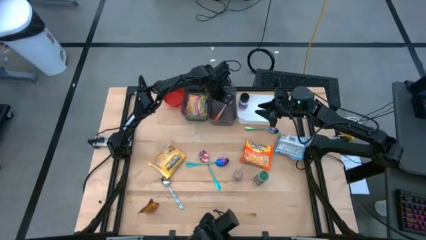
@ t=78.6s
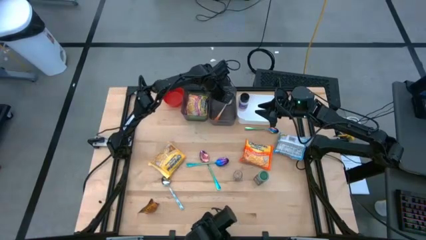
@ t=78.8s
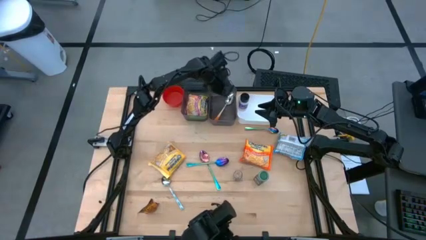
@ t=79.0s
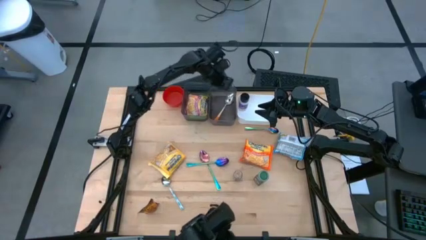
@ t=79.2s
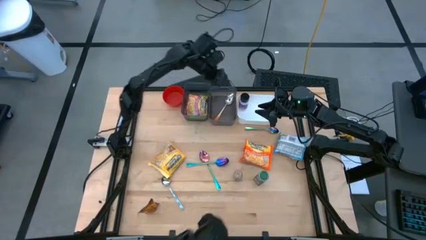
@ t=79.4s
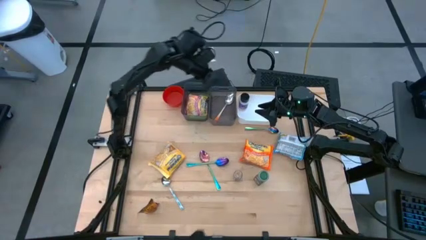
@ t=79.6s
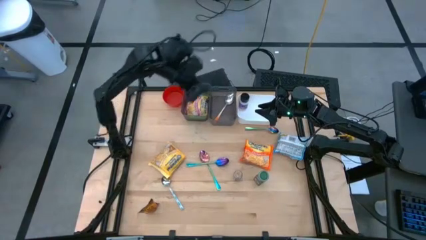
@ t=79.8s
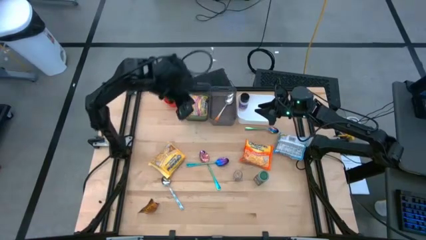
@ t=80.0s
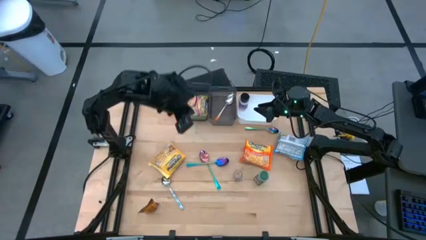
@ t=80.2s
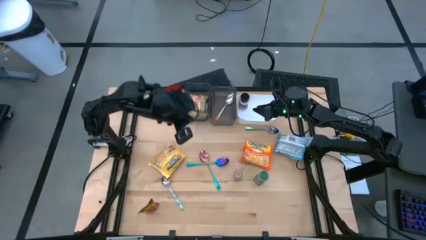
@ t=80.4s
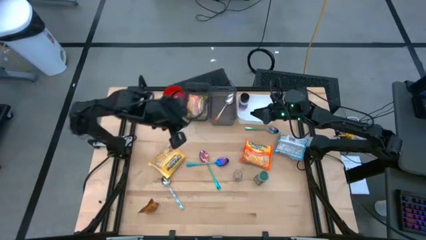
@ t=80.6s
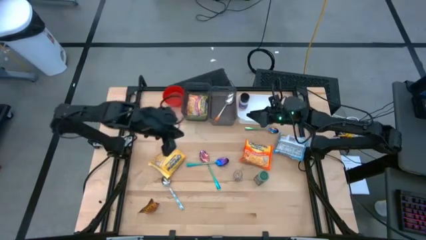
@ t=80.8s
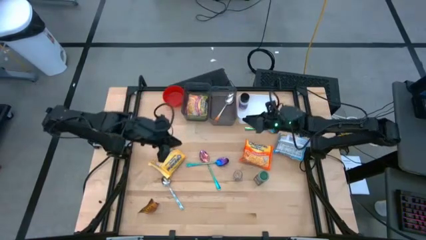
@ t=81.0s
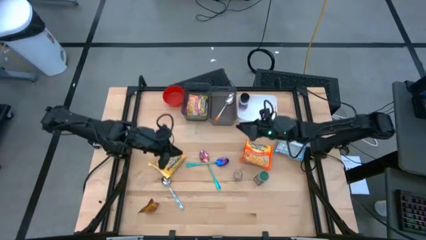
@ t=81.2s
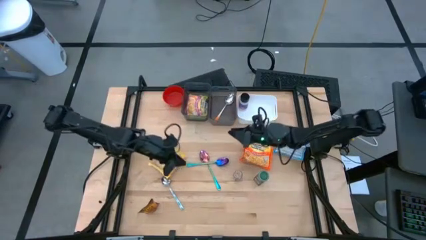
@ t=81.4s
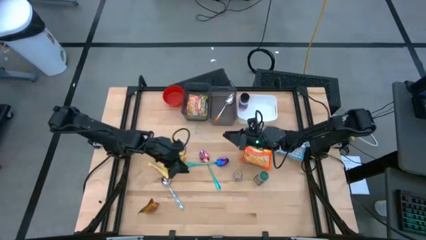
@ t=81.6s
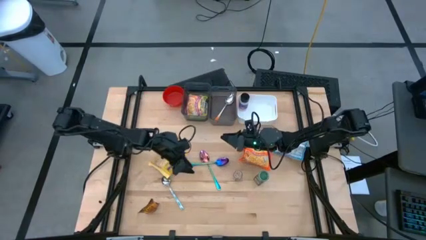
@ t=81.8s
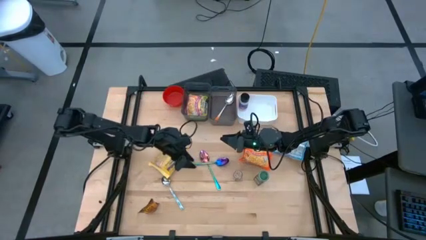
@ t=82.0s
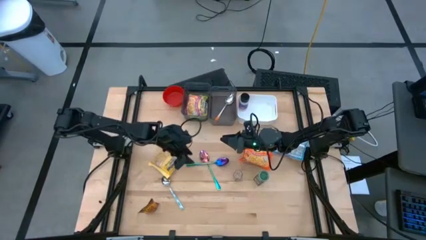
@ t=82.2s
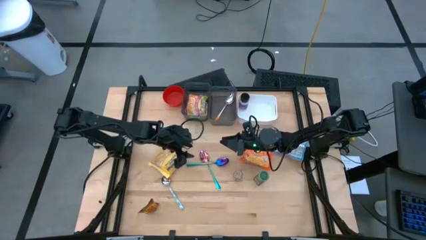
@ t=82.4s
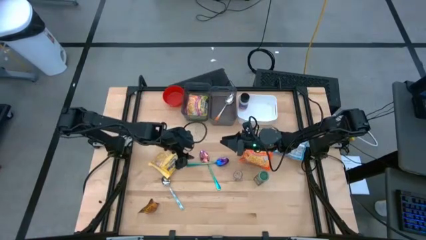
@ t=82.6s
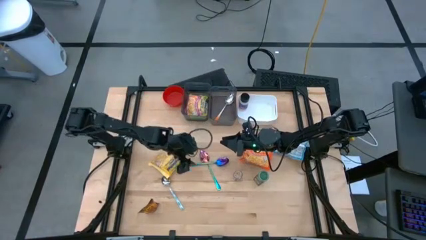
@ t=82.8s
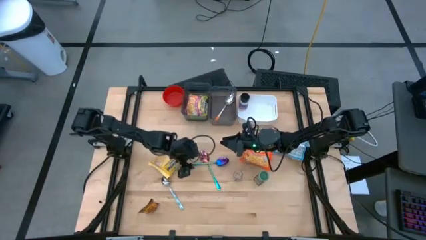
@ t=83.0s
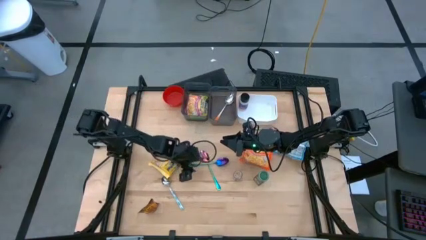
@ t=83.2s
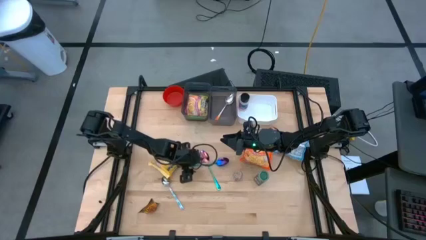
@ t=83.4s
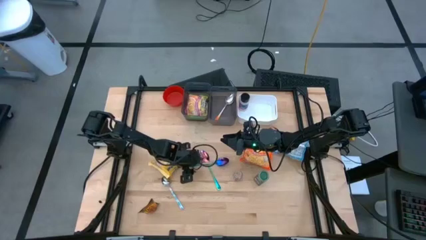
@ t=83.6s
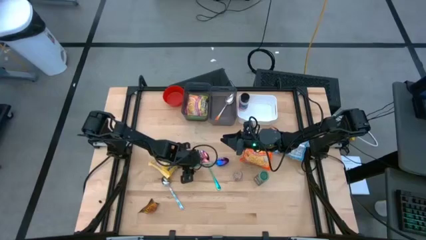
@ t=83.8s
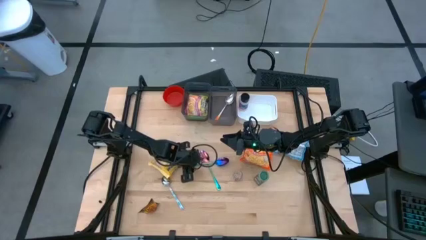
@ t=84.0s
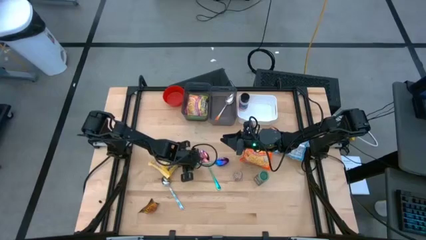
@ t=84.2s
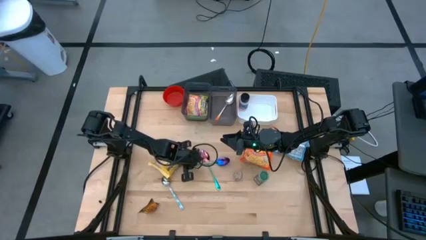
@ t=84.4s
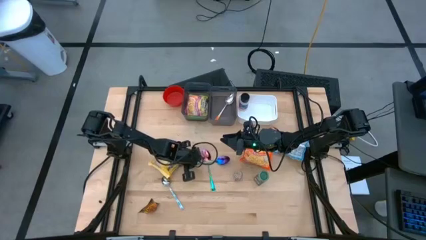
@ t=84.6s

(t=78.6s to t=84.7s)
Task: Pick & Place Food Item
Put the bottom left violet spoon into the right black bin

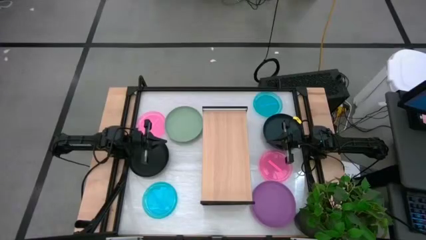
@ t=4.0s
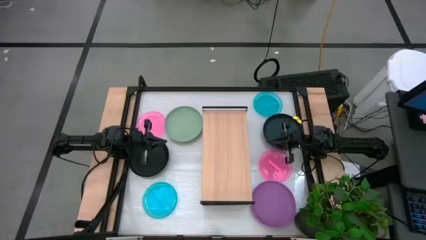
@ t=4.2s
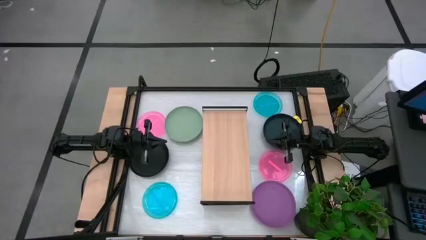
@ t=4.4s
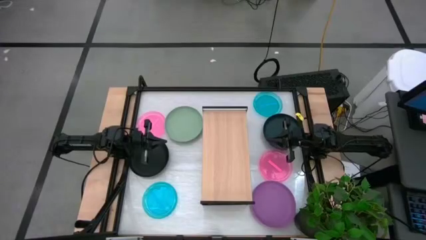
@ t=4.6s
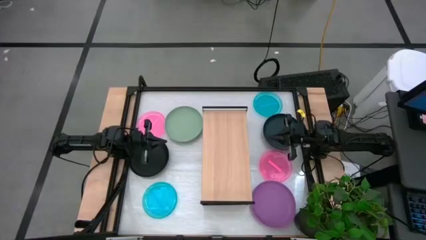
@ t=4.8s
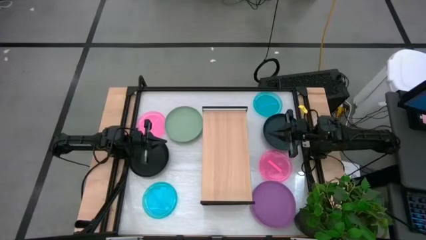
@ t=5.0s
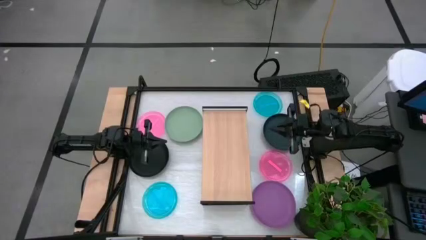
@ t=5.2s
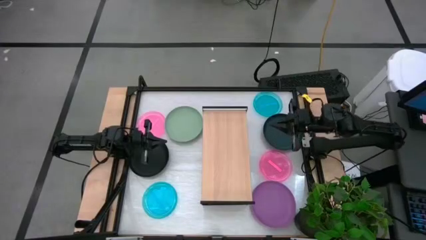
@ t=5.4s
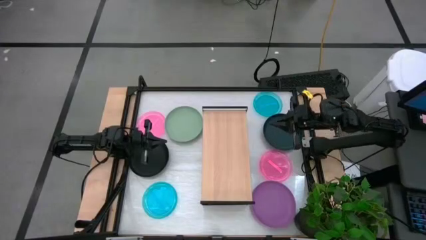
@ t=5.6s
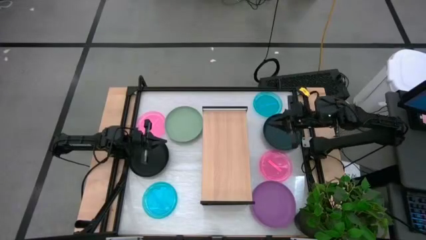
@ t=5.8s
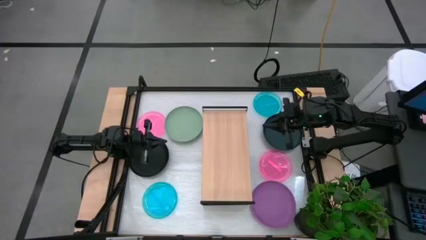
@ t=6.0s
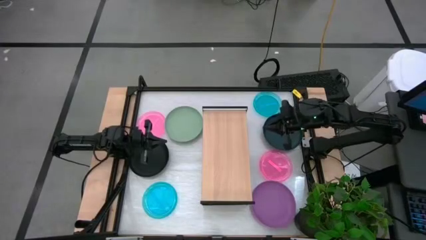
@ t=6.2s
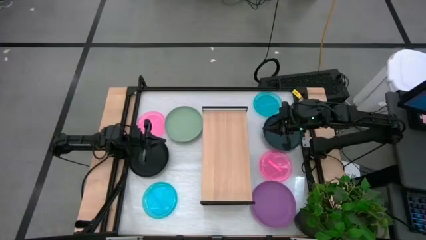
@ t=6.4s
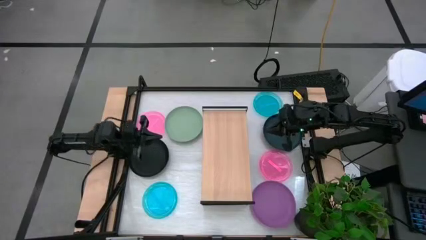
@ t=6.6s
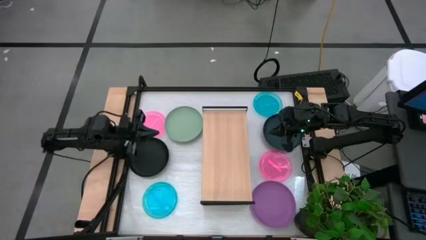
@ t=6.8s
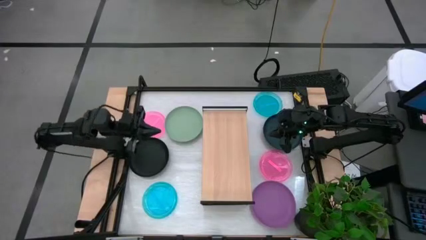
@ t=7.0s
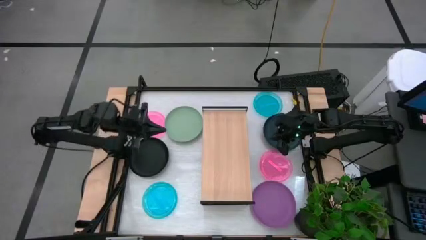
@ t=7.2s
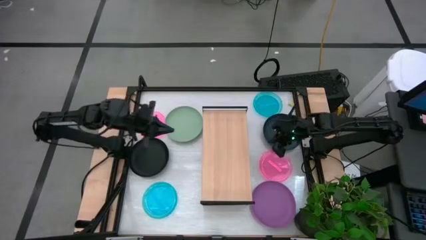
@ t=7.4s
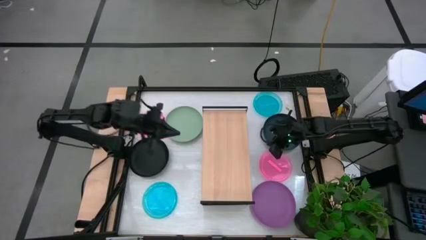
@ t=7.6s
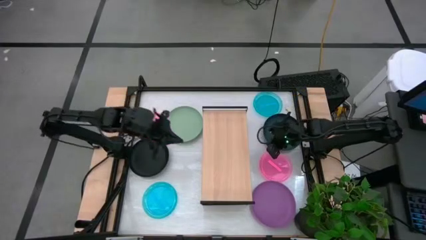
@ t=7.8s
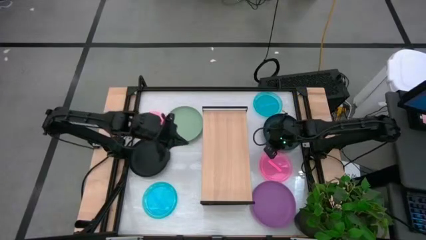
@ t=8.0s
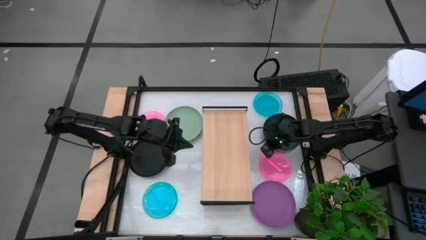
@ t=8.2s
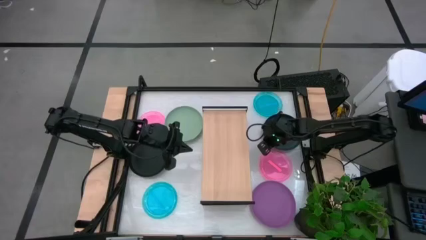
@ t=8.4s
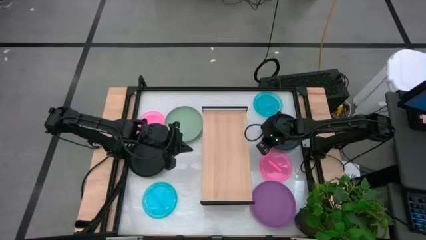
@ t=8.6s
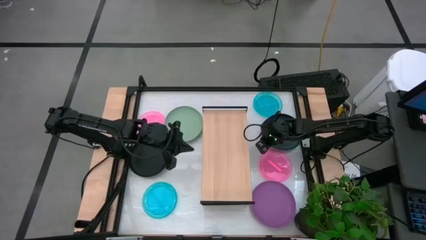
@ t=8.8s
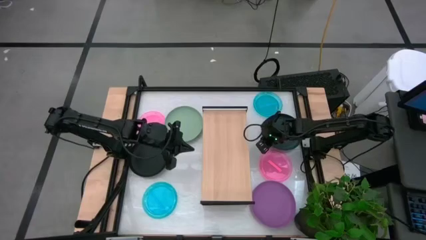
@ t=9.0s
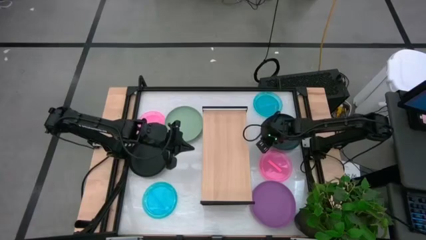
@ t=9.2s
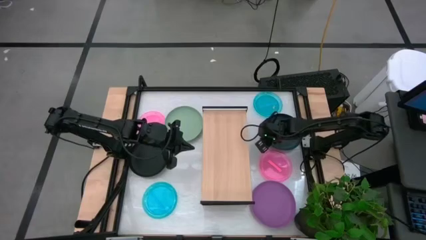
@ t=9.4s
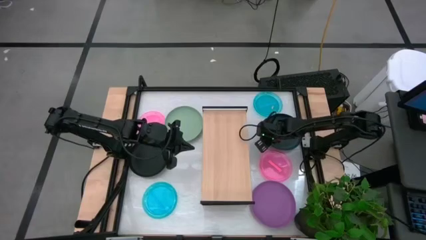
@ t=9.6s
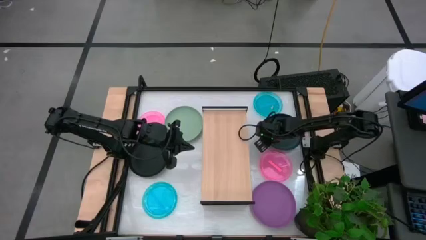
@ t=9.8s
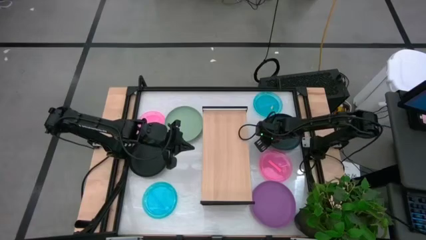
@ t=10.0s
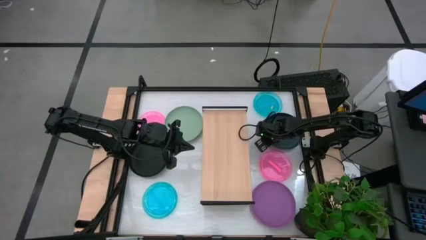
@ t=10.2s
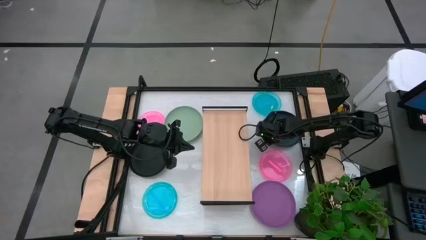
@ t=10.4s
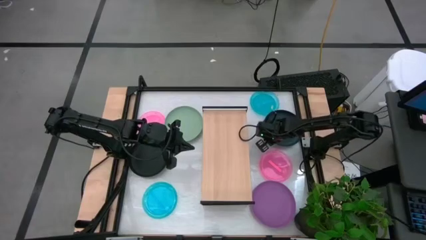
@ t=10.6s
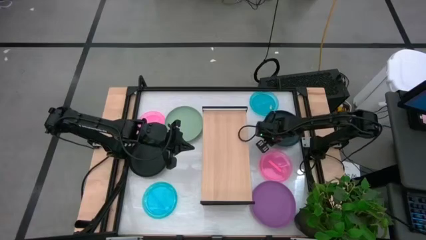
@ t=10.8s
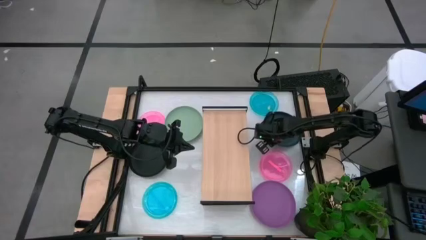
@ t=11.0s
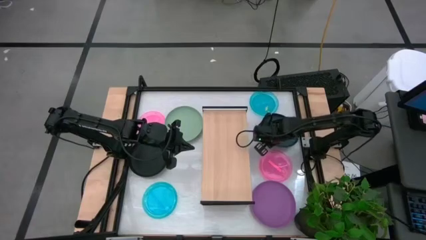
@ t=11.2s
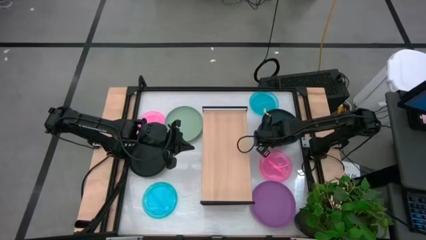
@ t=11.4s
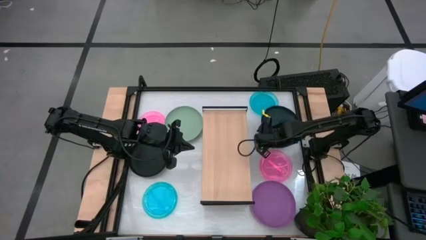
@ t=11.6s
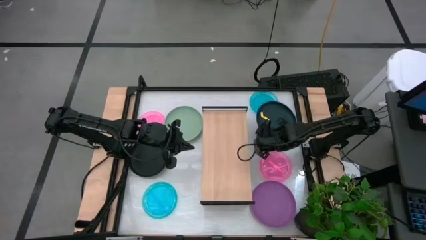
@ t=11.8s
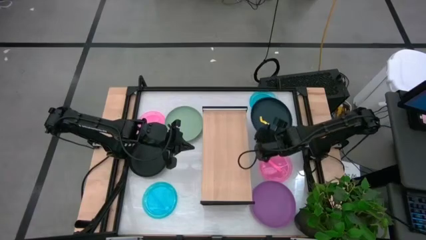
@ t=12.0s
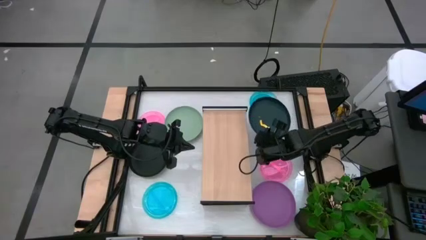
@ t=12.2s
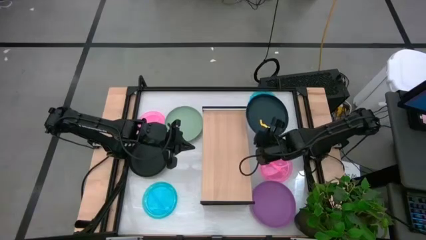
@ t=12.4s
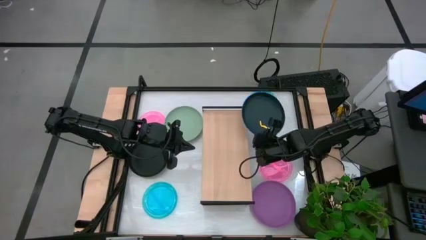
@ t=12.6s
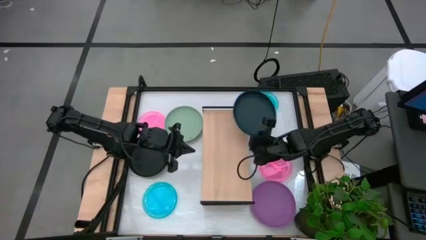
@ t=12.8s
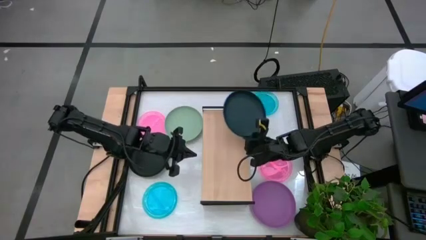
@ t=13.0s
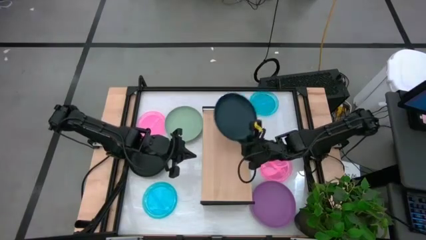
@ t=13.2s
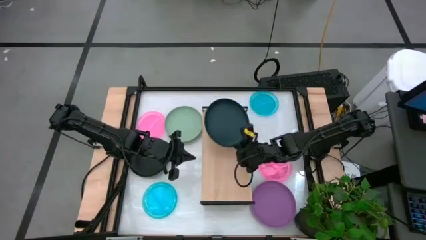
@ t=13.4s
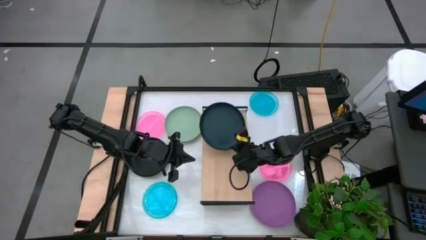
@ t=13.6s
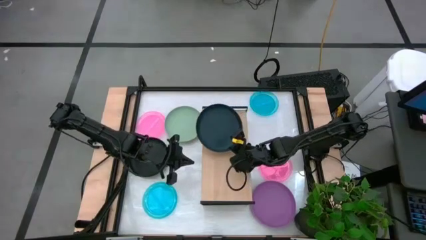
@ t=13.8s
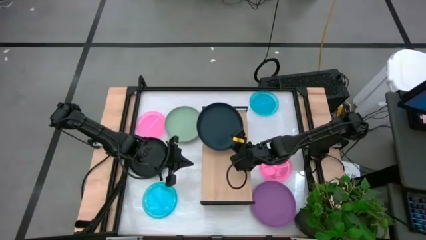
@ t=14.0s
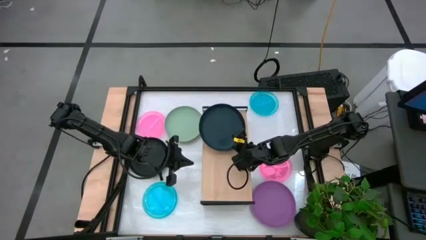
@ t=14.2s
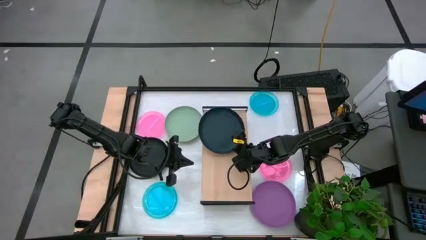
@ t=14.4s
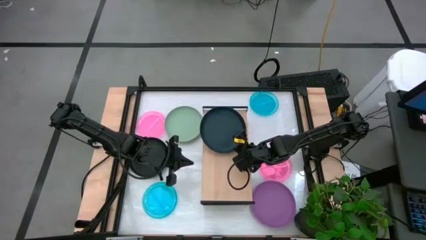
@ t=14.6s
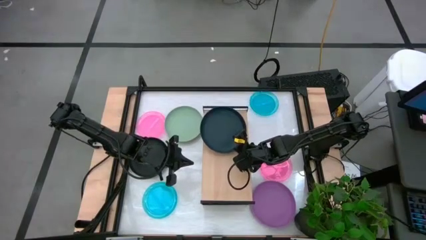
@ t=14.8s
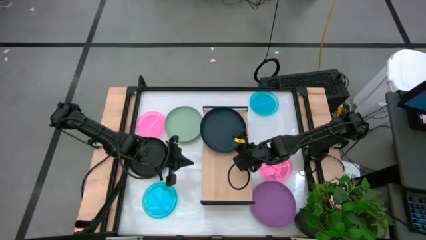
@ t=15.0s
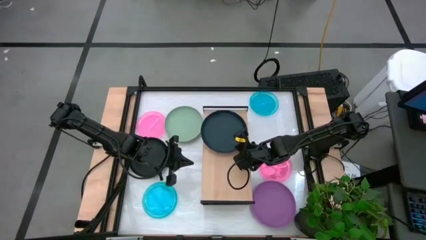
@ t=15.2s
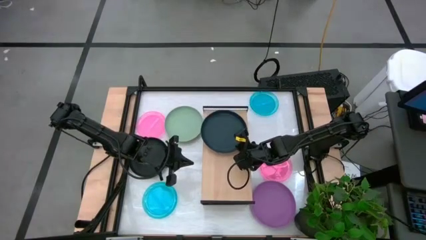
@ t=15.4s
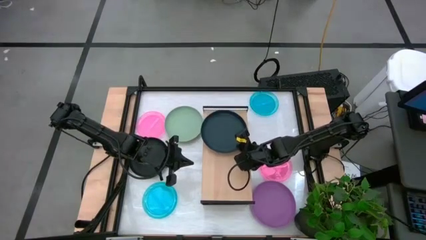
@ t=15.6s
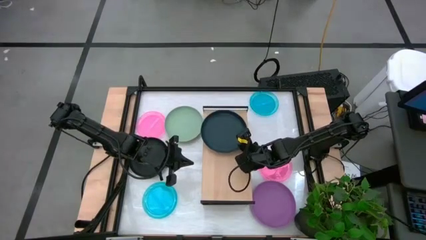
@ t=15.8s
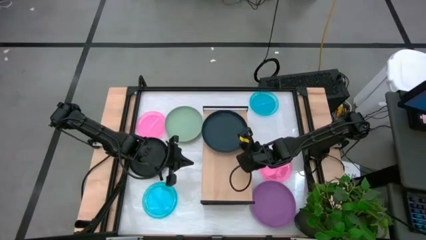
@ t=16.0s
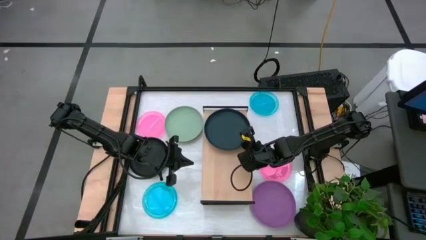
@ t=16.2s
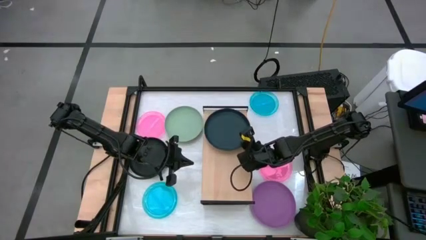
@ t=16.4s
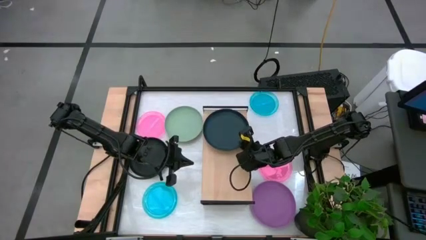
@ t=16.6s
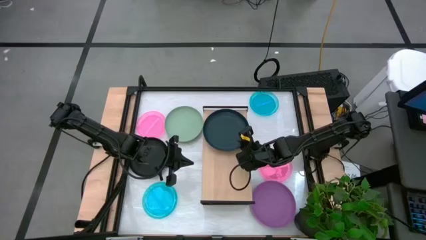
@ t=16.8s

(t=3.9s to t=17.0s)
Task: Place and stack plates onto a shelf
Put the dark green plate on the shelf
